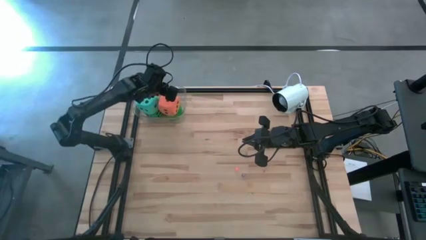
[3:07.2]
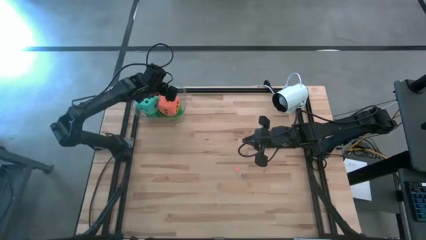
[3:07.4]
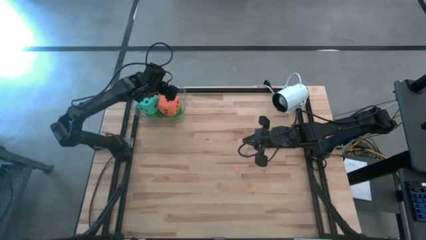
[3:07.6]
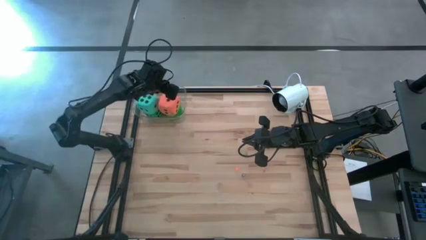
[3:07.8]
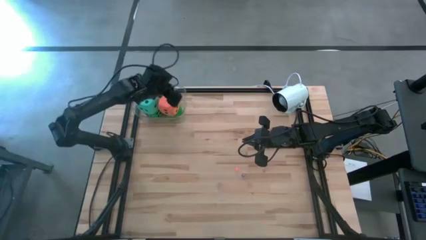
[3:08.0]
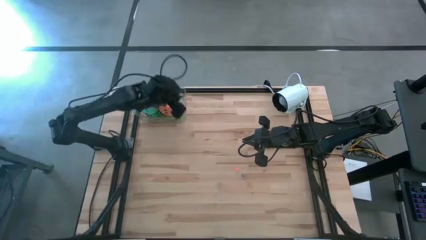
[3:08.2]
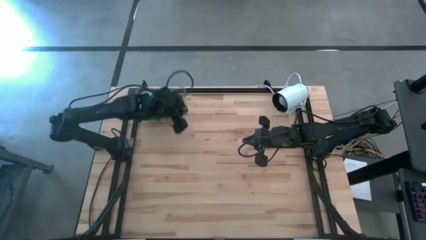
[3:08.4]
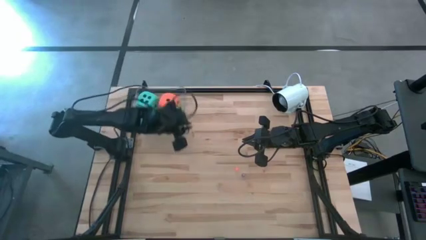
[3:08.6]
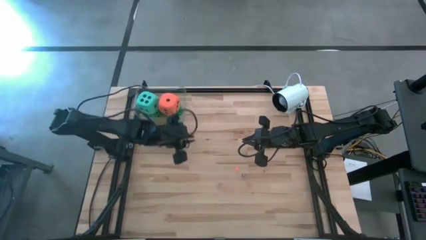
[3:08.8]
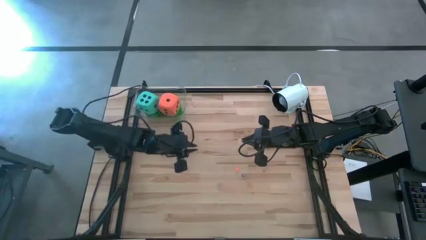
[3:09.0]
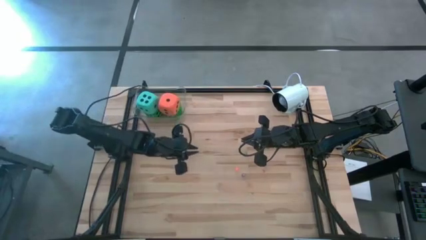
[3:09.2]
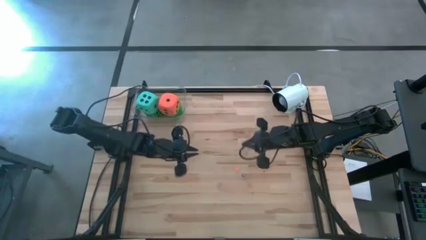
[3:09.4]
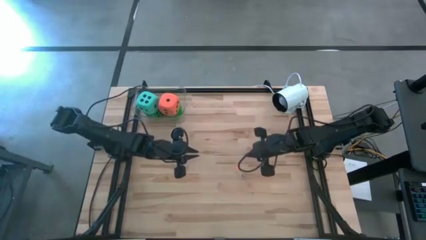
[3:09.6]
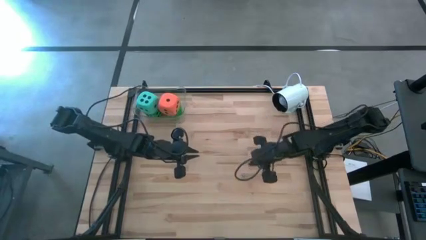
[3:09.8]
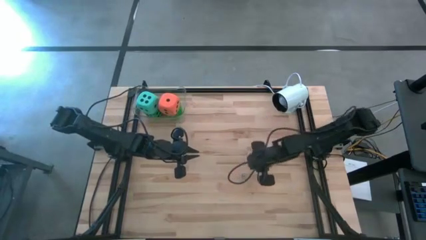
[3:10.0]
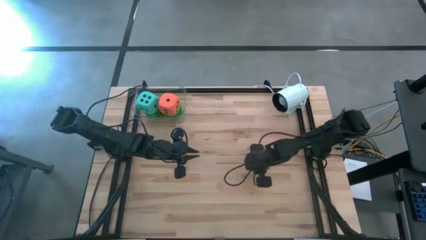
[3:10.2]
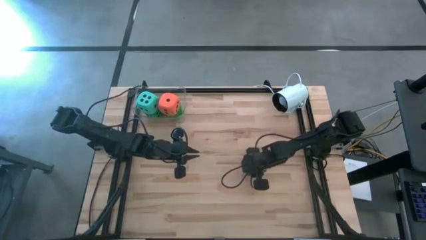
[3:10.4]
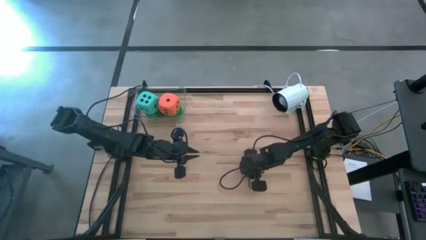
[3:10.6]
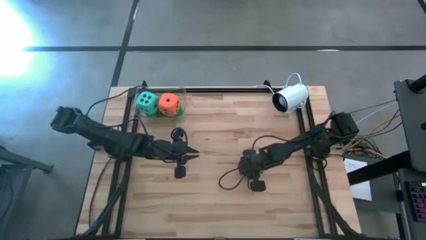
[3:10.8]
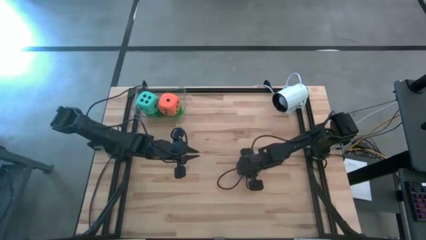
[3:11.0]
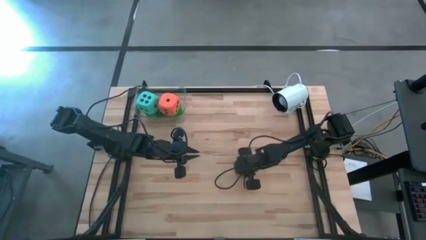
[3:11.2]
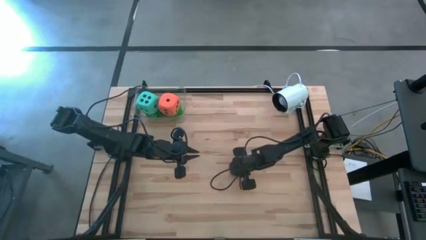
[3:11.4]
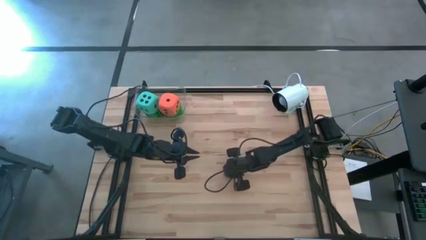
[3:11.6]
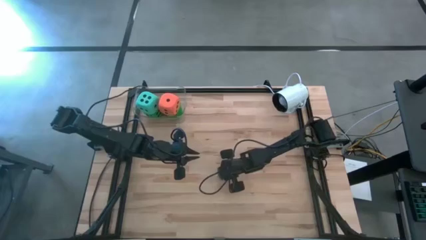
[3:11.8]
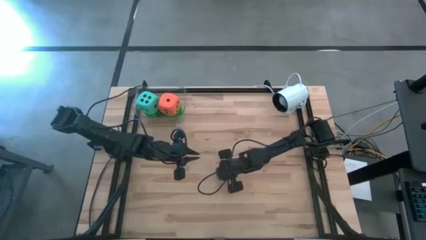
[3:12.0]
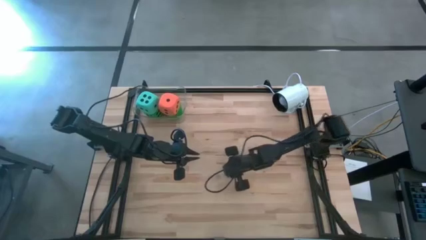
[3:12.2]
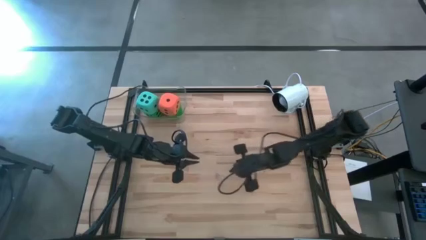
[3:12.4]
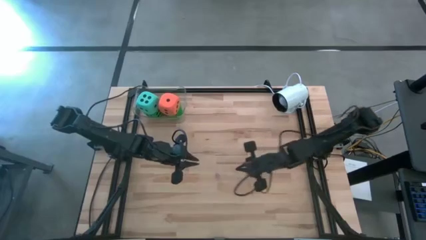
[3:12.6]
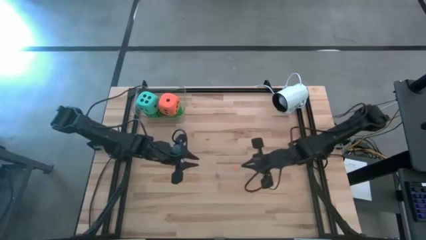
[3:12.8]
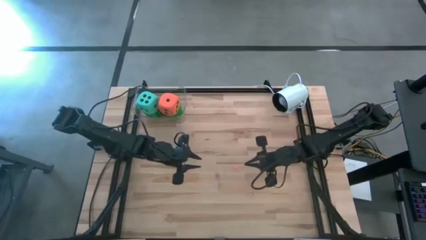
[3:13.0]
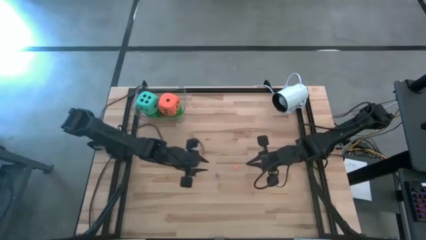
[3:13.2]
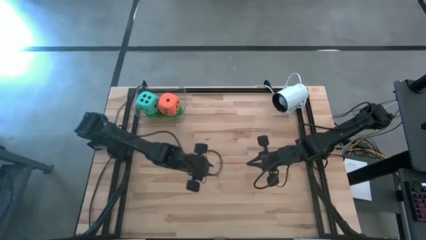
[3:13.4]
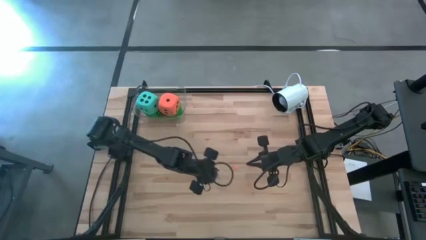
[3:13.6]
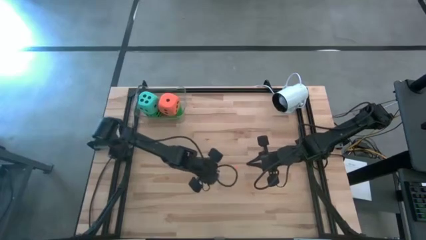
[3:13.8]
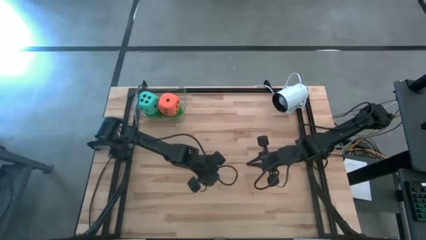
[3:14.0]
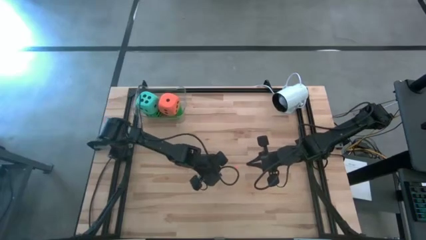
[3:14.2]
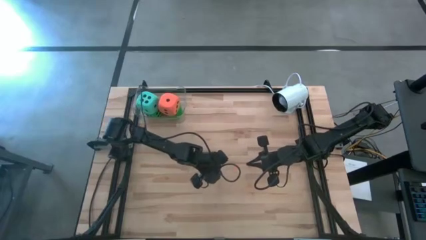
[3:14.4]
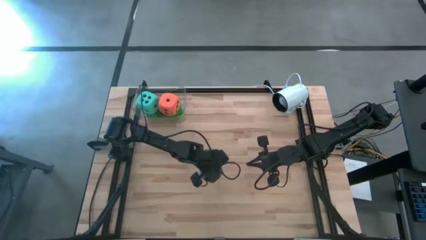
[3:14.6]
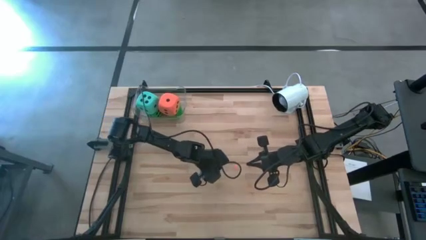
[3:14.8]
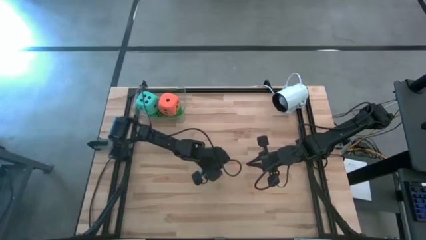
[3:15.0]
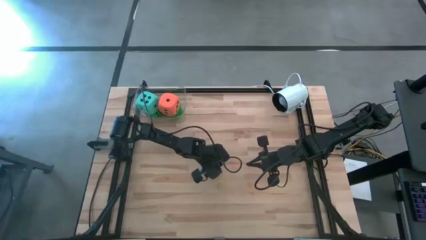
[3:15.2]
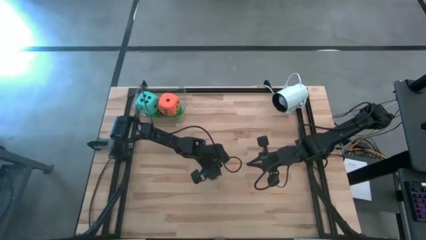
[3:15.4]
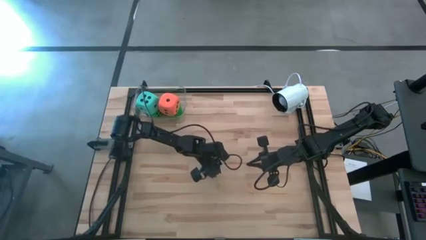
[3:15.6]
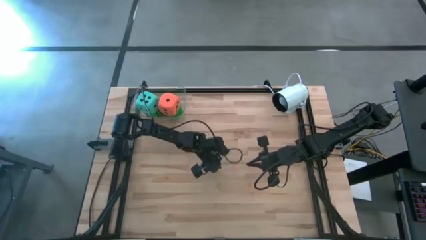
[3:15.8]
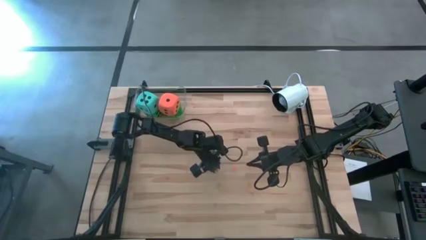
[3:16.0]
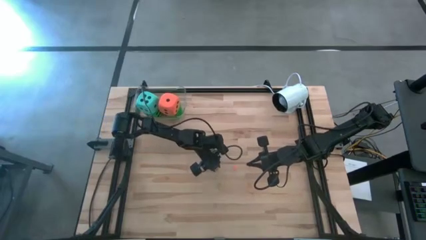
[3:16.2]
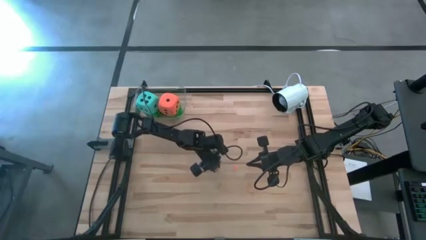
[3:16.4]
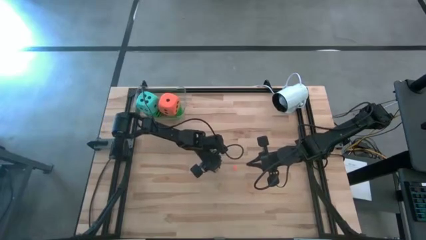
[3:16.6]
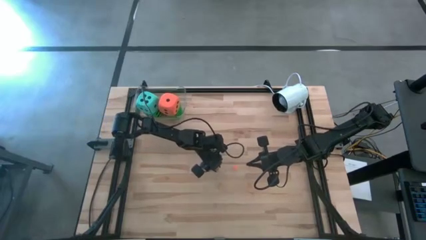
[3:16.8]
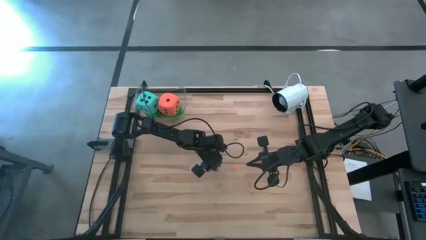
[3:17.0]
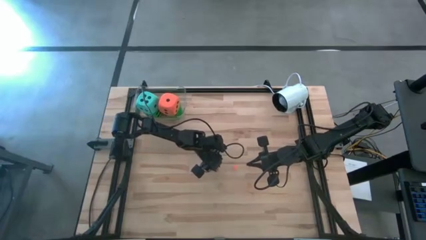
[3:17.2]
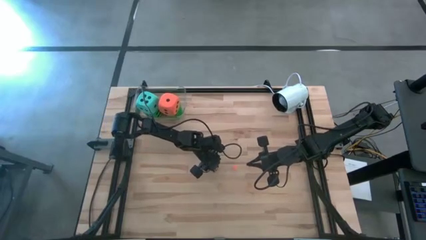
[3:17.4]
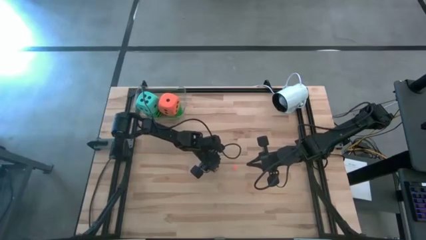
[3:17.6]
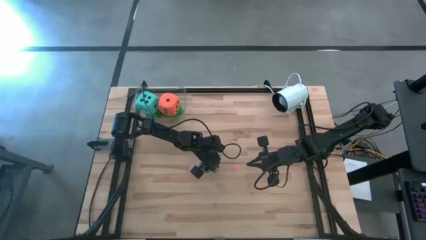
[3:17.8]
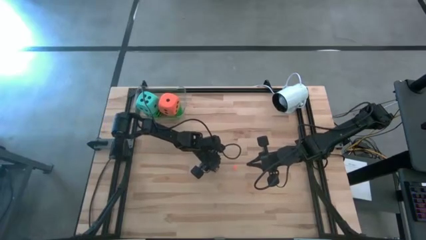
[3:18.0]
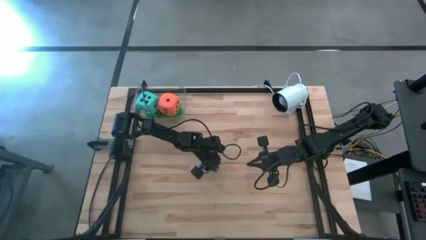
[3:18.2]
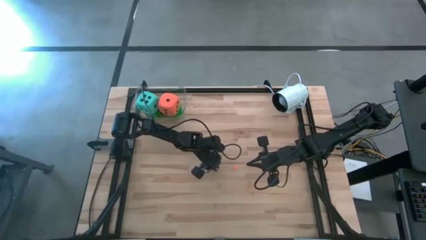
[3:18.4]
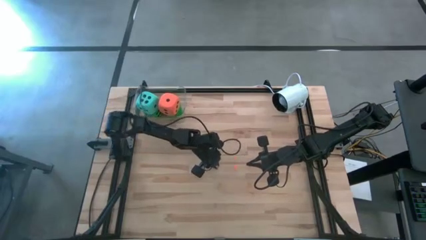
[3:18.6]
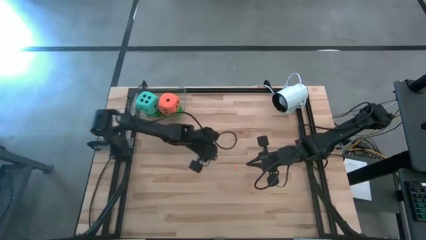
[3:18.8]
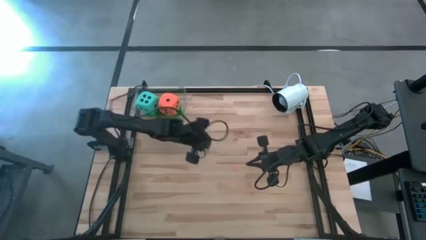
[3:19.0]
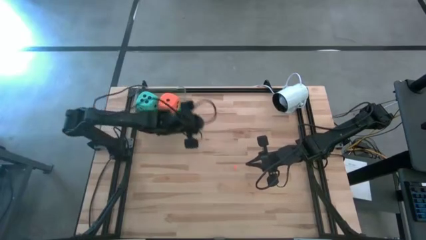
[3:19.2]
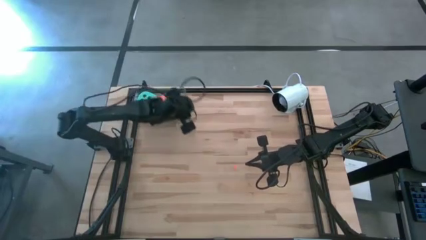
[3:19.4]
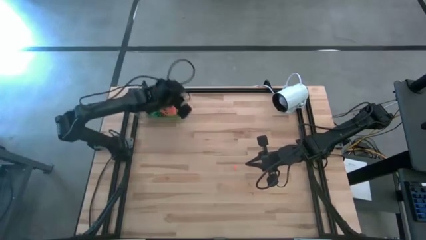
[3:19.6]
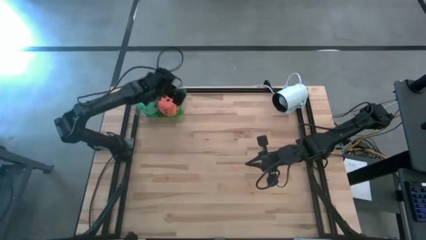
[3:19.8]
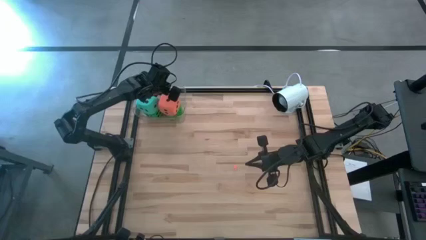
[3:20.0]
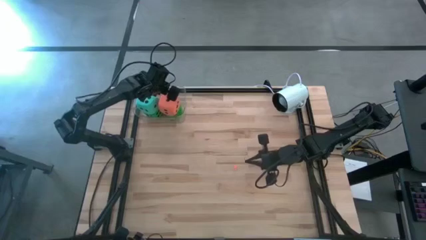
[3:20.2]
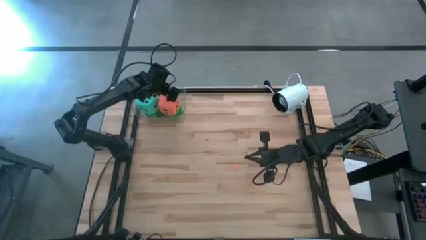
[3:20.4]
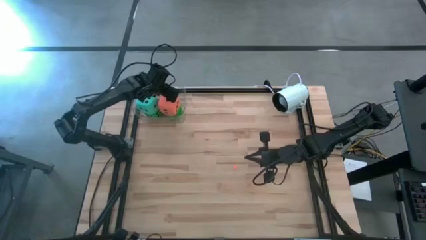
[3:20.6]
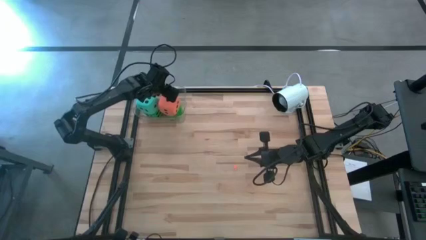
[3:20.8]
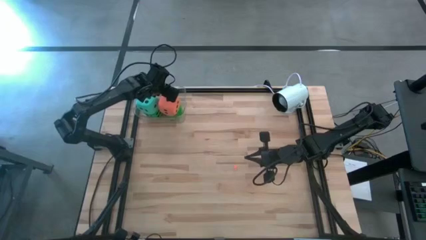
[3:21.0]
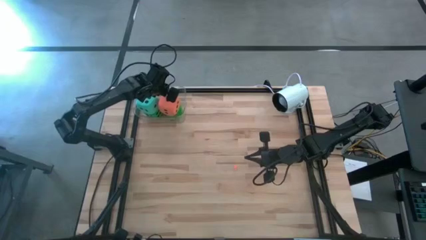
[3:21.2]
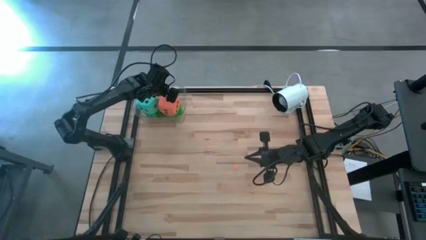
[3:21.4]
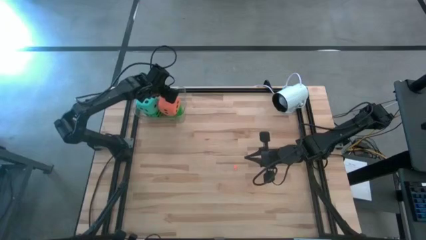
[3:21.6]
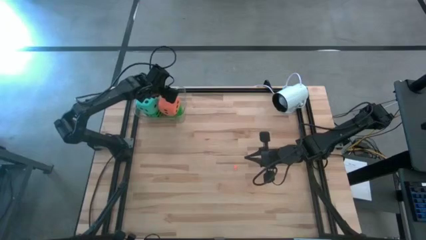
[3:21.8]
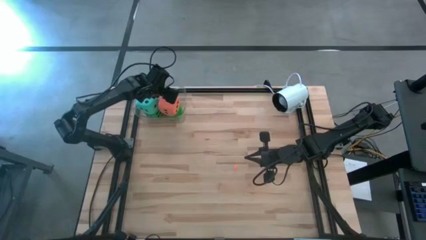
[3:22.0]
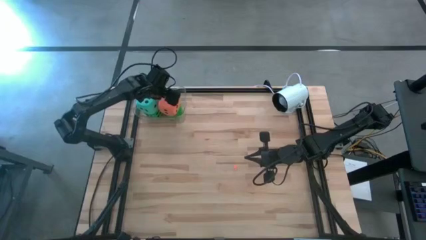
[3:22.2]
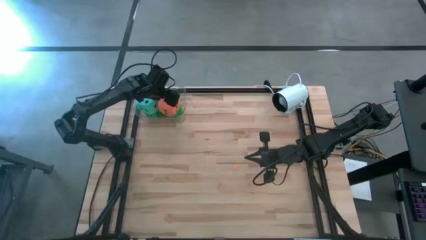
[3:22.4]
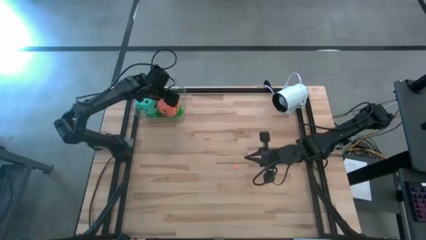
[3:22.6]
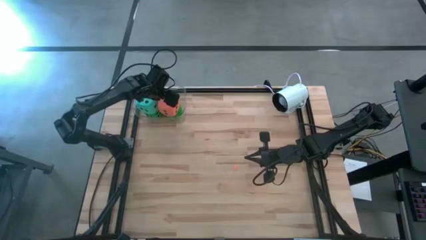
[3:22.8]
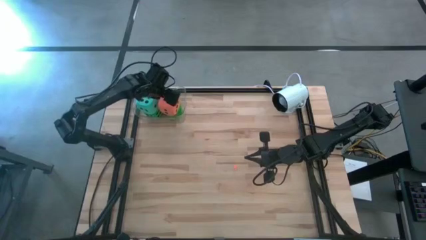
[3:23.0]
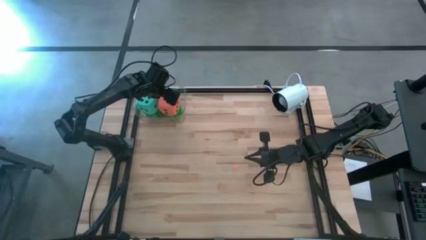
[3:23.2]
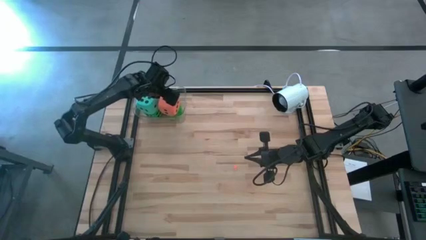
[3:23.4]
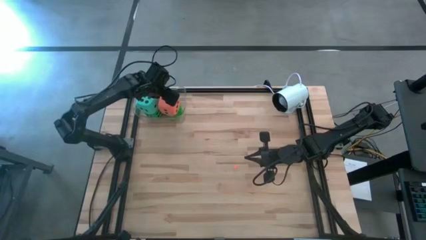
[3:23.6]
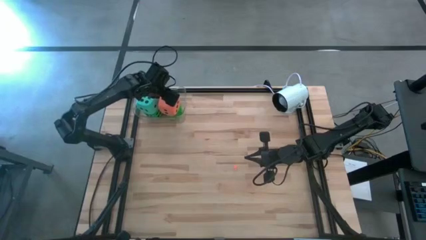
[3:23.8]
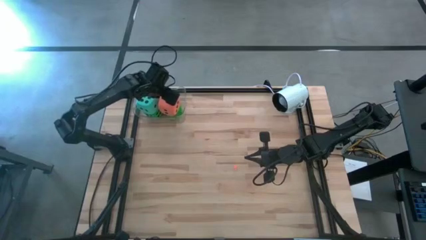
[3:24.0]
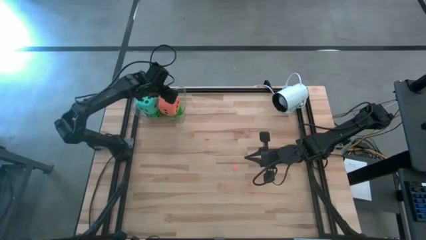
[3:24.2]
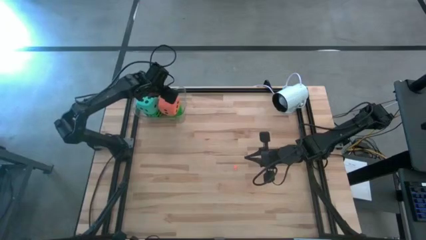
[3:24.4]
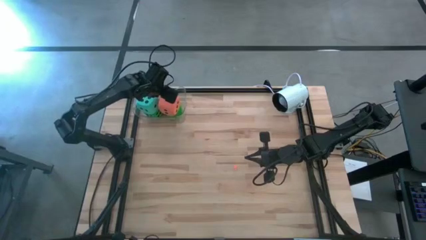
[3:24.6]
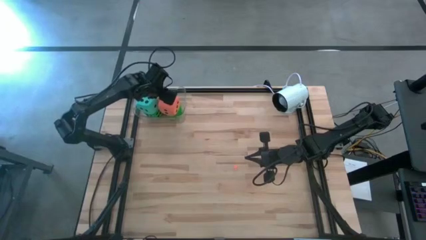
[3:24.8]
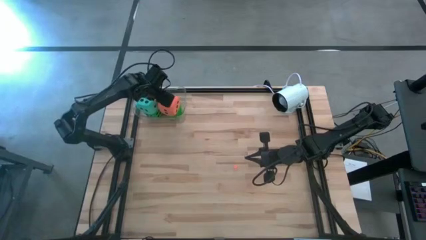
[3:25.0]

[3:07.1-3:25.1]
Task: Pick & Place Dice
Put the small violet die into the transparent bin
